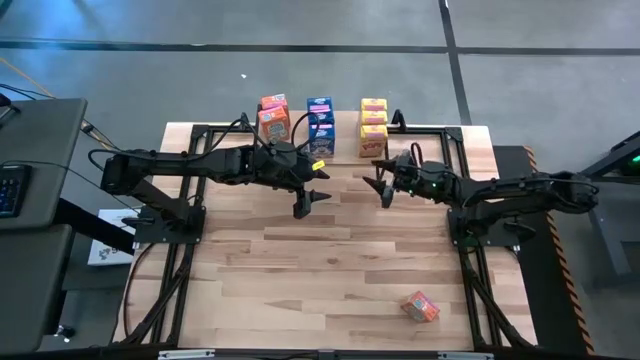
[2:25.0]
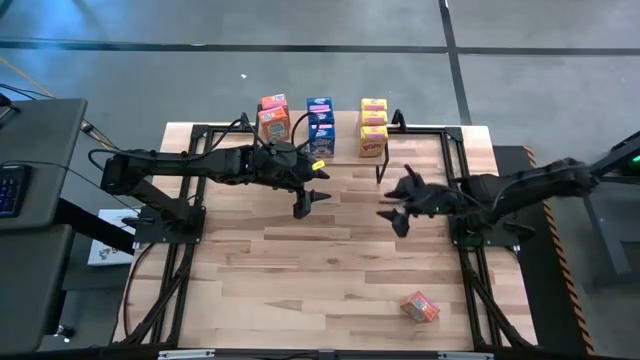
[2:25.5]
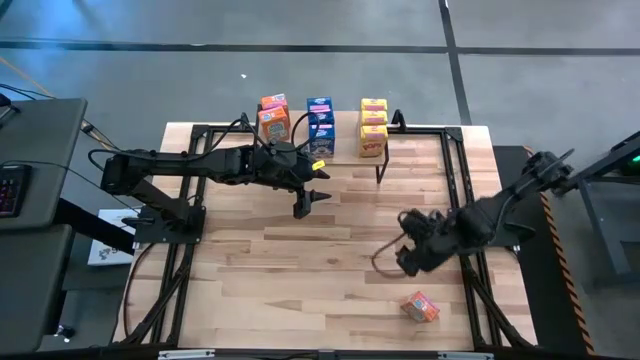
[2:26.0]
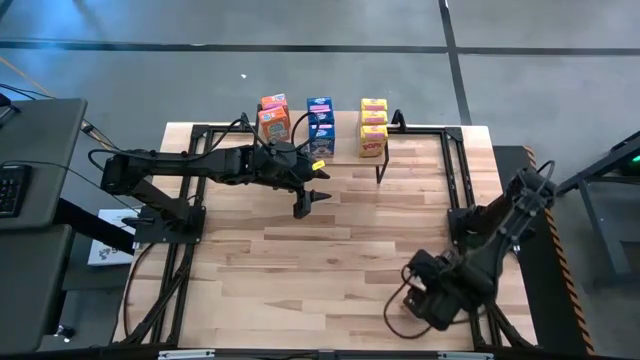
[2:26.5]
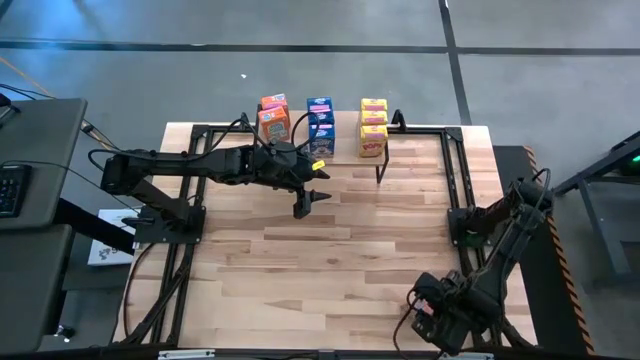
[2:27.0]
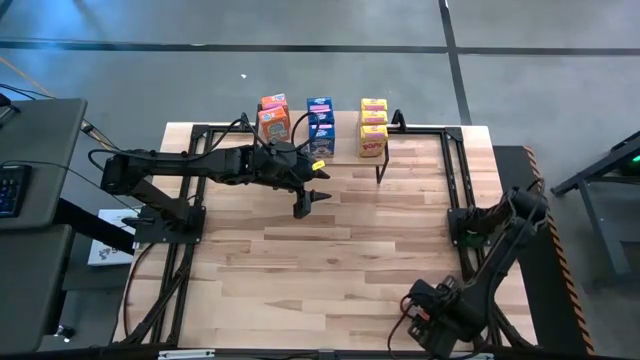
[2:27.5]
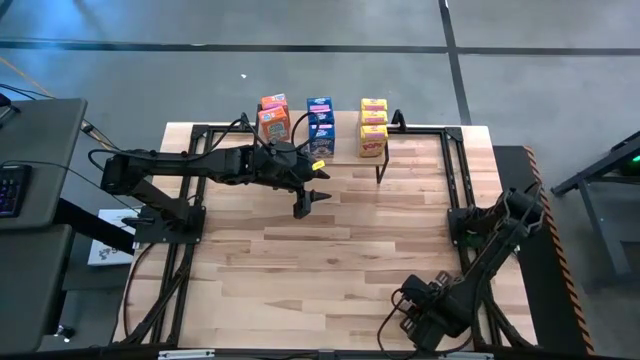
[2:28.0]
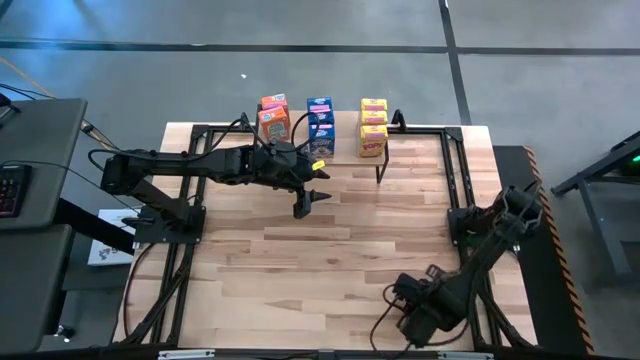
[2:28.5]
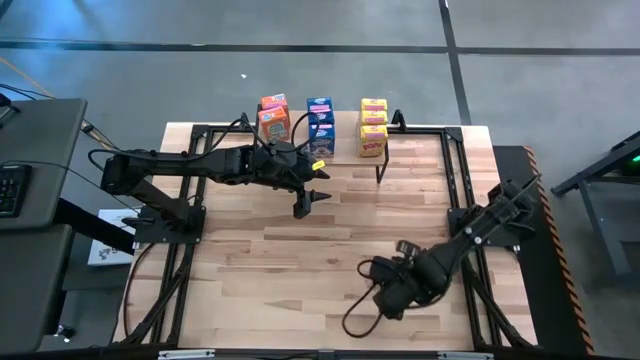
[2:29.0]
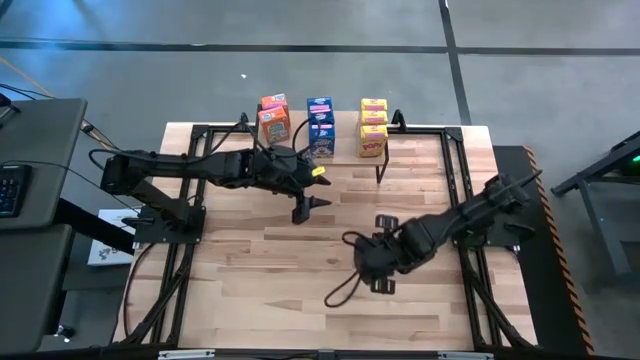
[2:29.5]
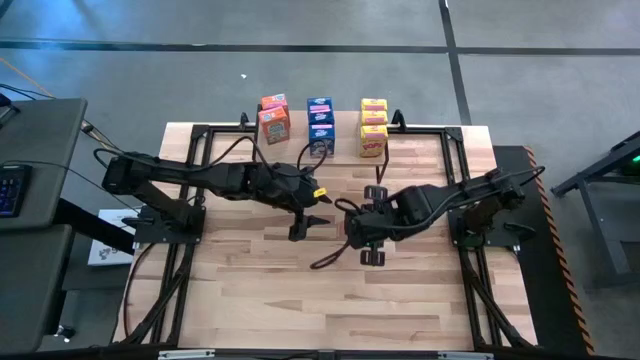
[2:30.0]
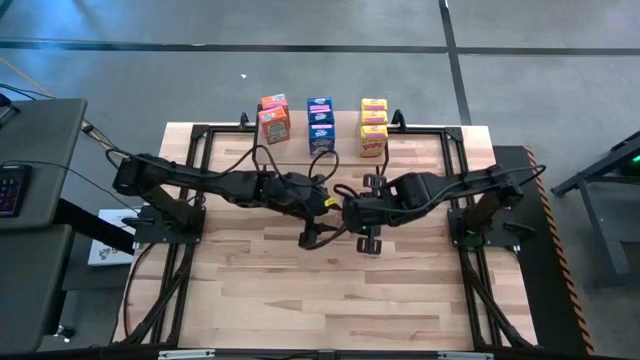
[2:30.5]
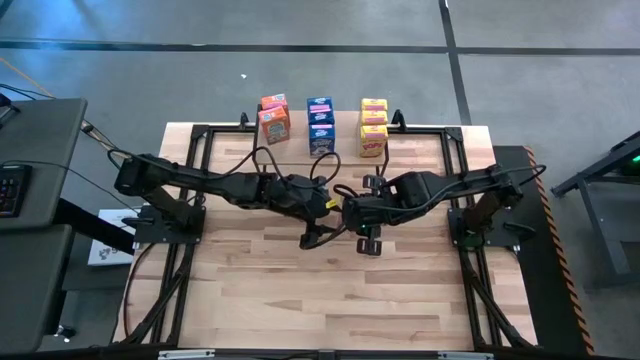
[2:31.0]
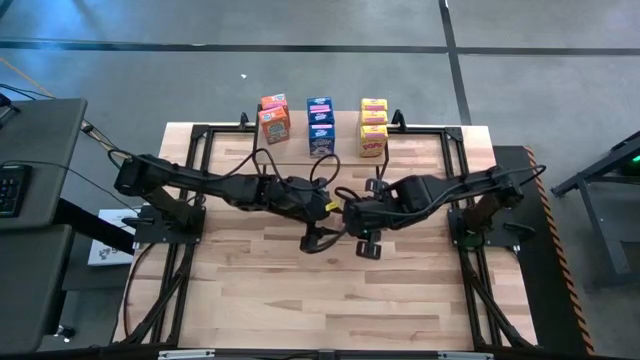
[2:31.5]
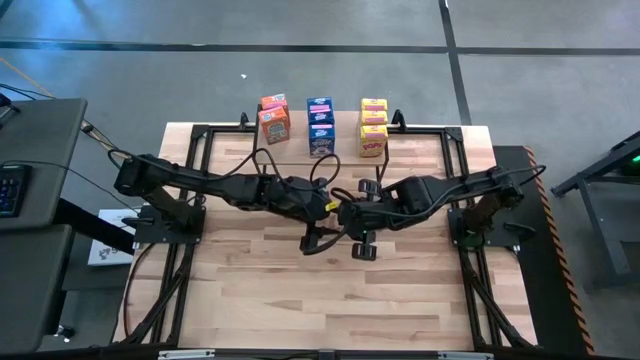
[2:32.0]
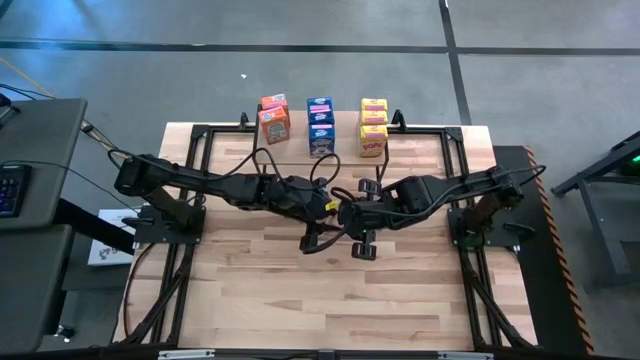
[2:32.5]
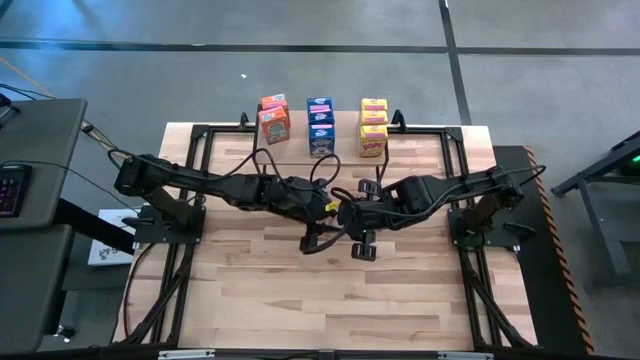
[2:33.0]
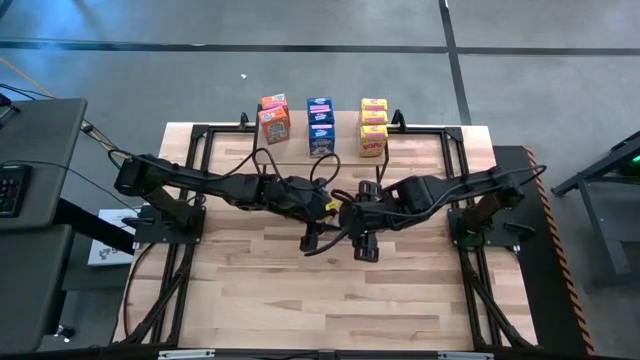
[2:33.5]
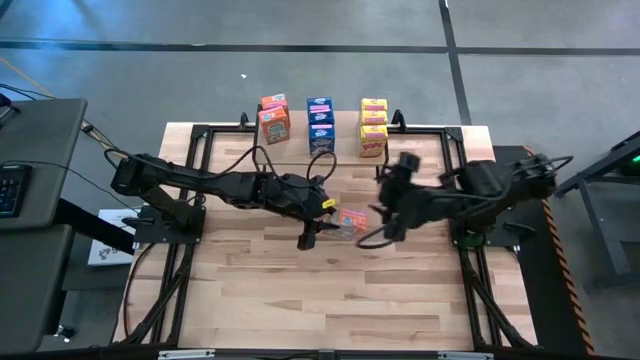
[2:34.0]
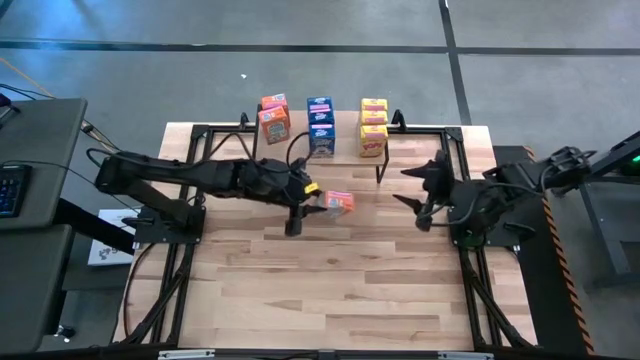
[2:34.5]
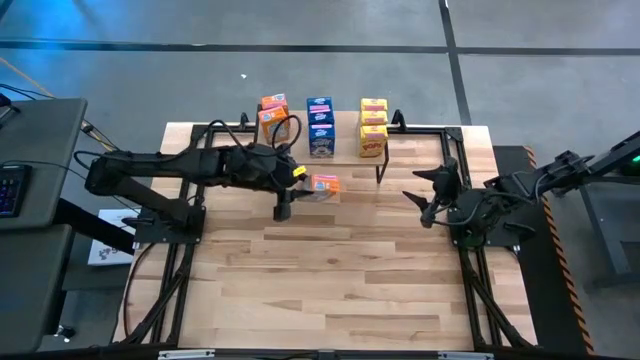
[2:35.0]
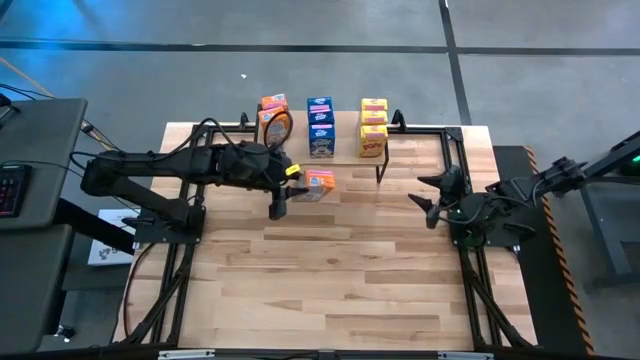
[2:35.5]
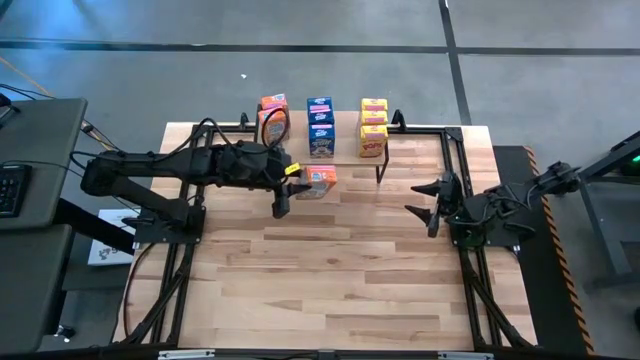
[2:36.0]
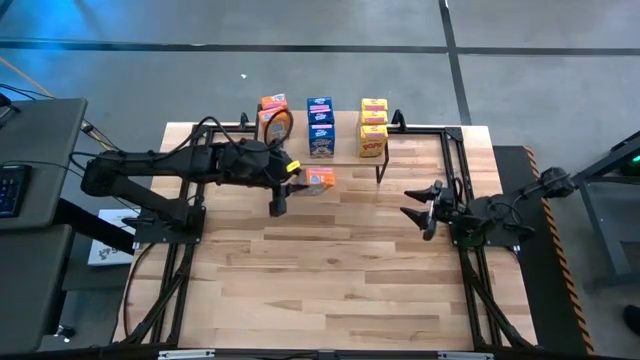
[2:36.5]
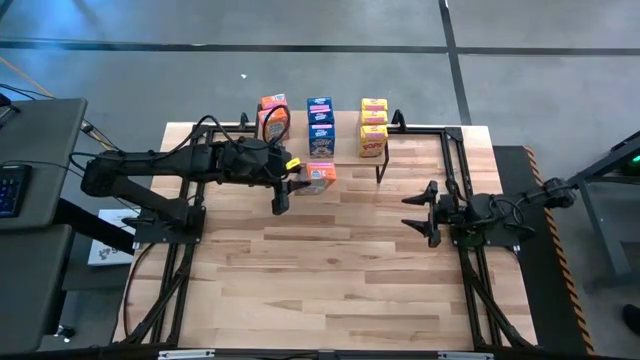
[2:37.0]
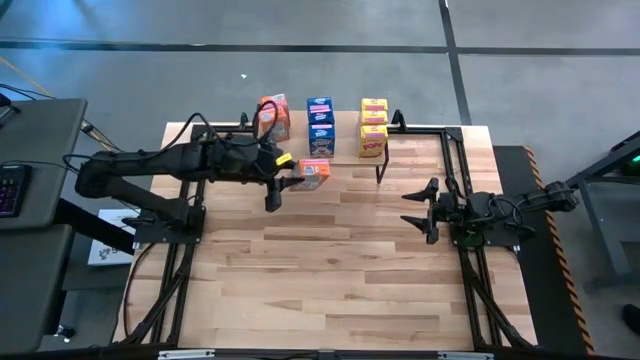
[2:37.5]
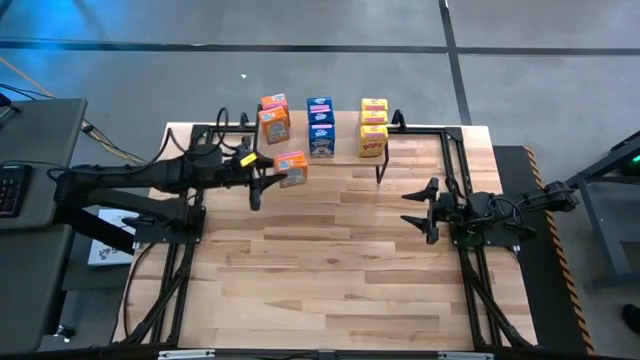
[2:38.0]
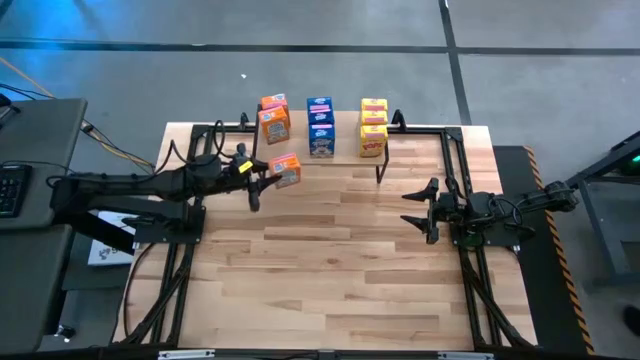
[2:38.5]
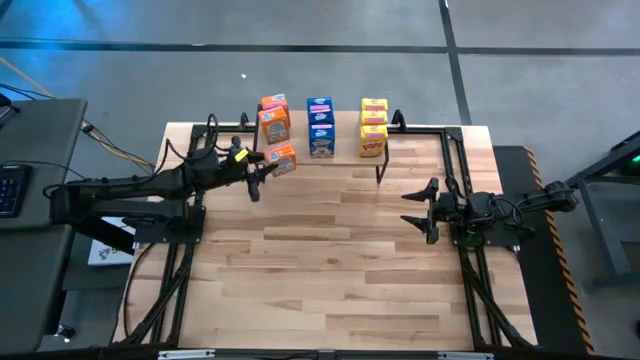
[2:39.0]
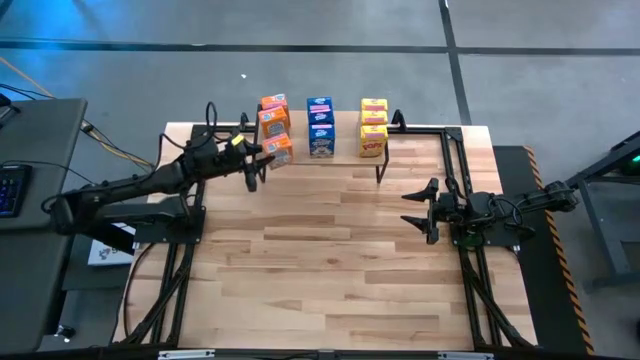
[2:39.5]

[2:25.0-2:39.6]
Task: Stack cereal on shelf
Put the orange cereal box on the shelf aligned with the other orange cereal boxes

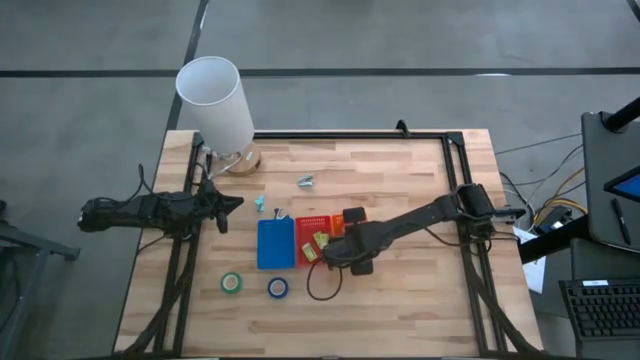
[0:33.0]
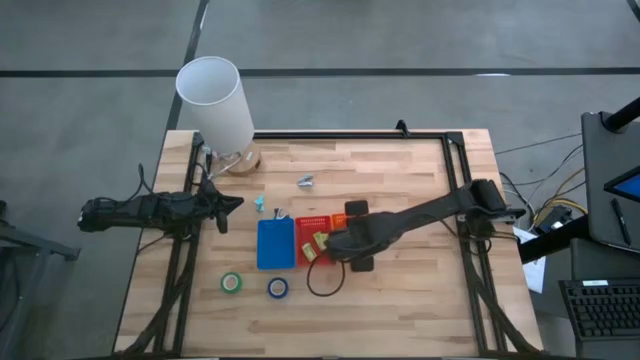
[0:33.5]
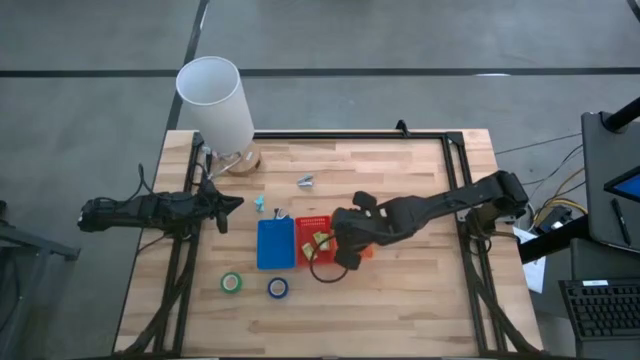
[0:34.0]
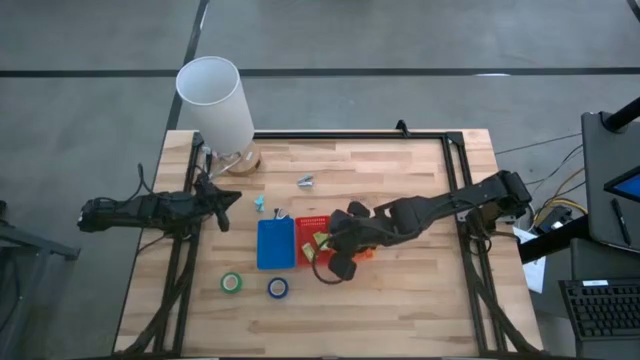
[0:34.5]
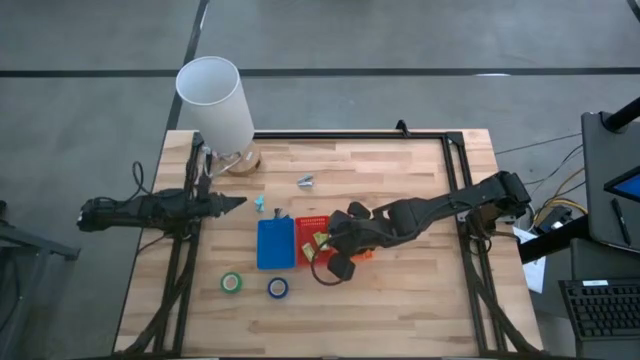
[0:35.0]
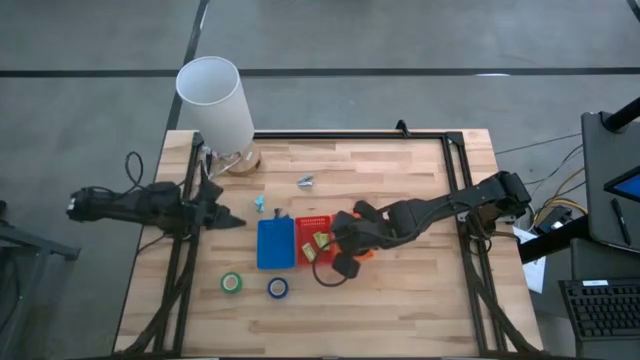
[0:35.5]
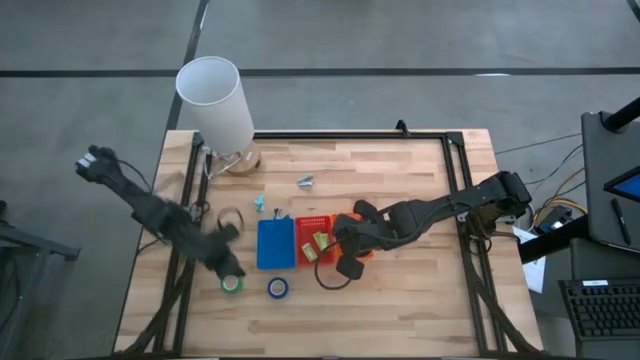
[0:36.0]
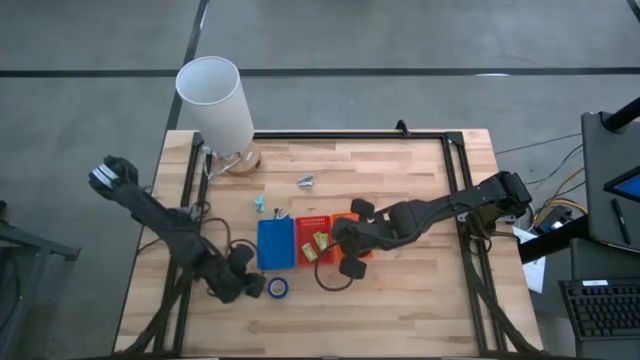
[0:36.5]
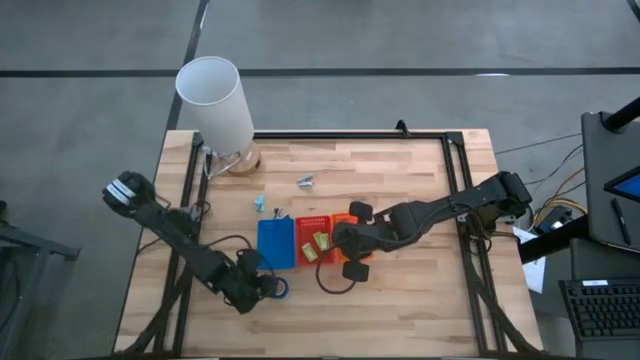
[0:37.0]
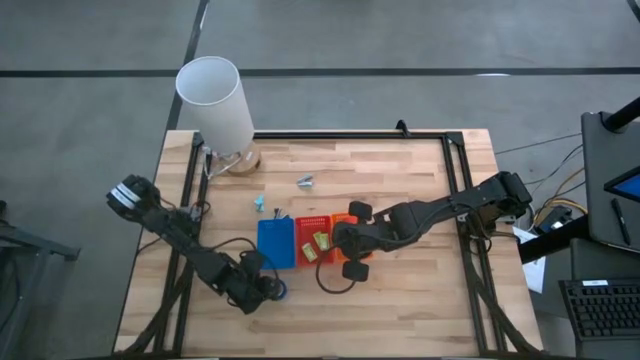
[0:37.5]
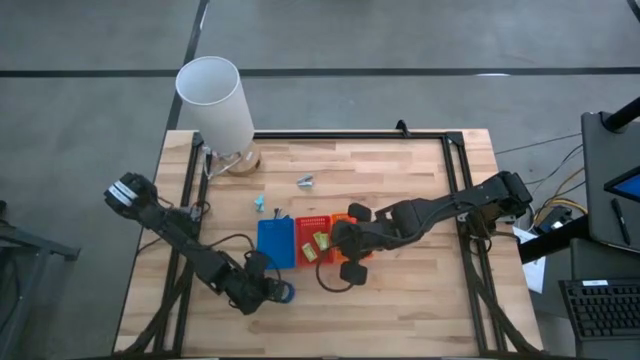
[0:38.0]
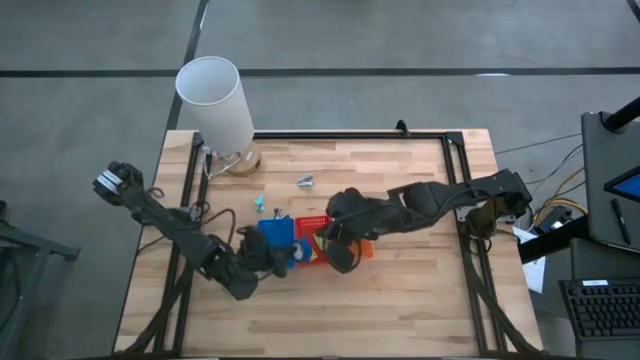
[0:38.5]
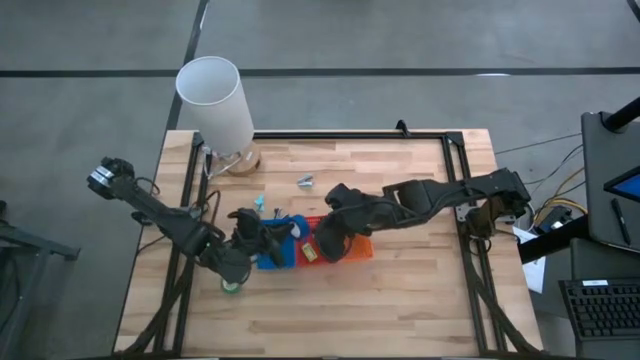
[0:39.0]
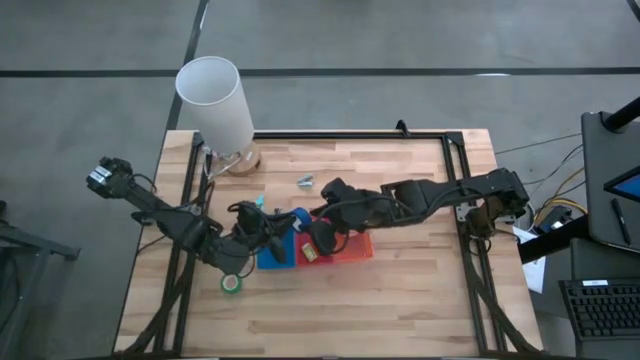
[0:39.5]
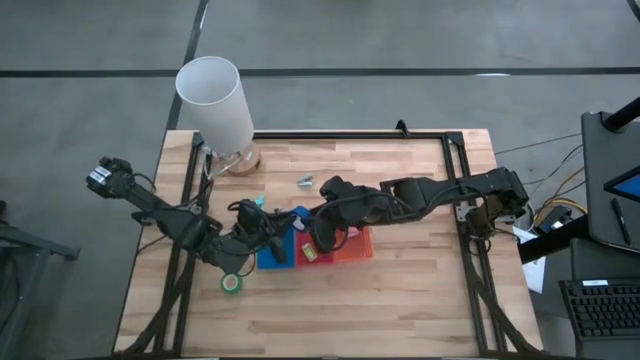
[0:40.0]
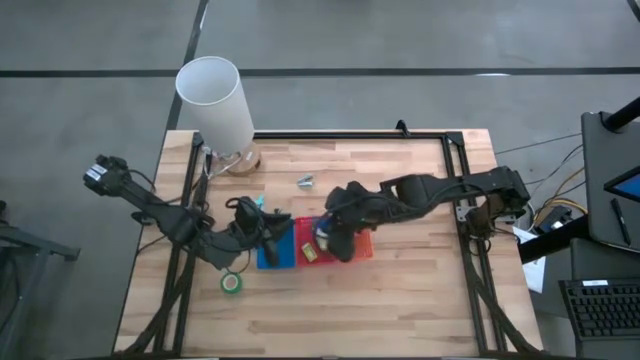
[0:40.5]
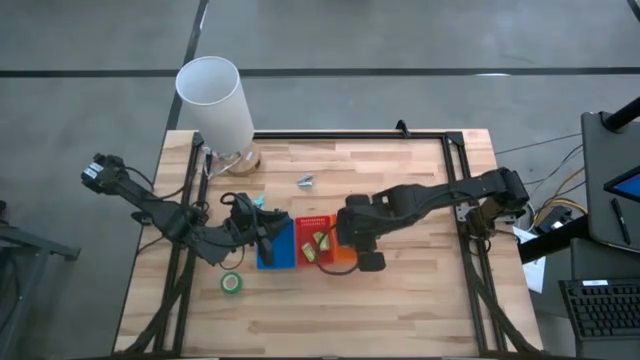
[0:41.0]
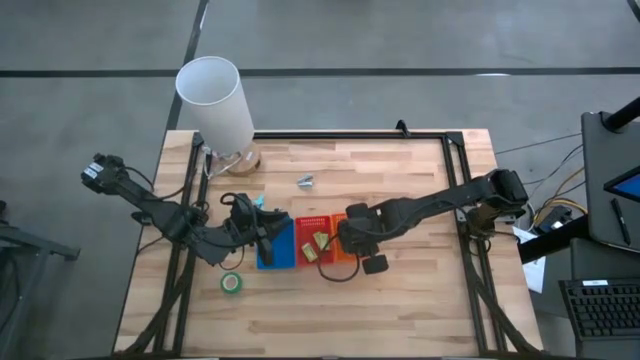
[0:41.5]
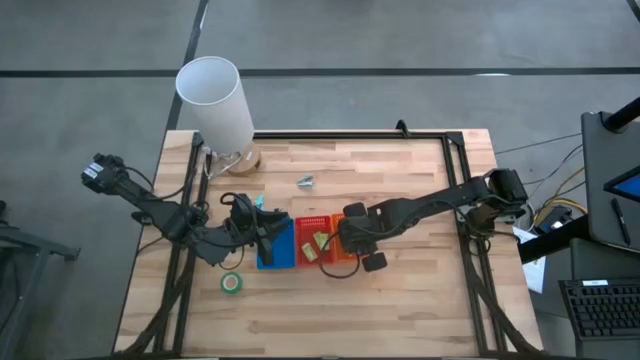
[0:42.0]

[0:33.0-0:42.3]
Task: Pick and place Stapler, Stapler remover, tape
Put the blue tape into the orange bin
